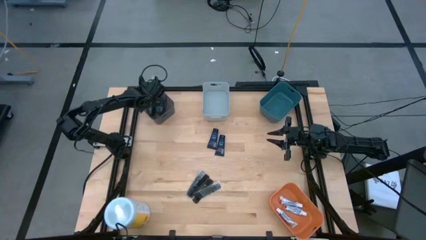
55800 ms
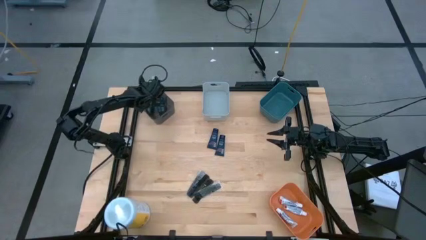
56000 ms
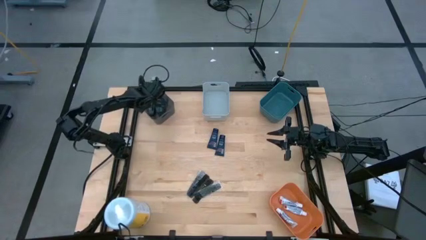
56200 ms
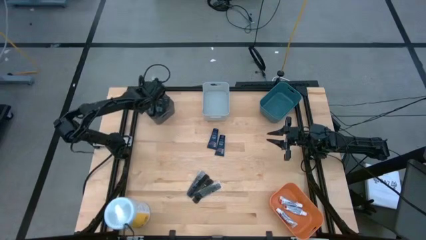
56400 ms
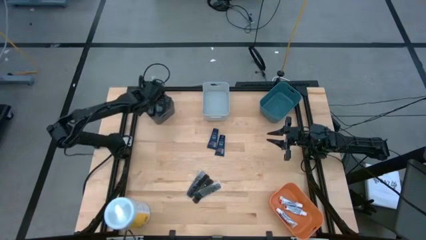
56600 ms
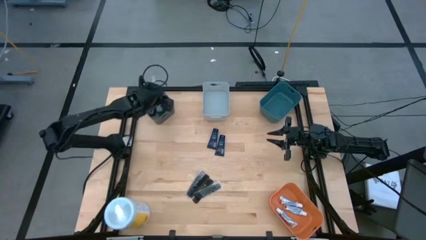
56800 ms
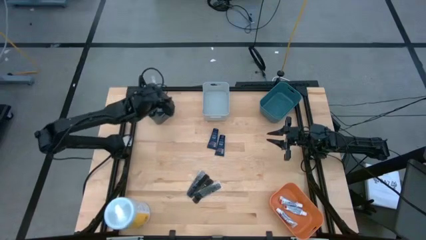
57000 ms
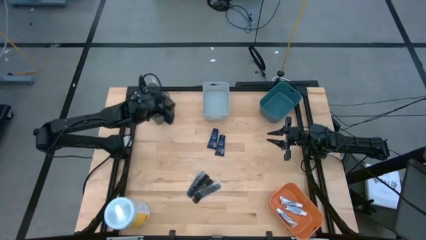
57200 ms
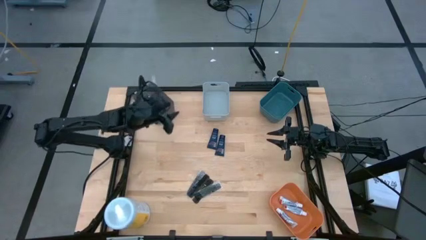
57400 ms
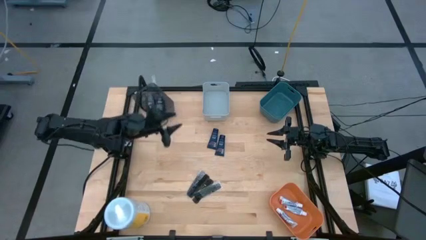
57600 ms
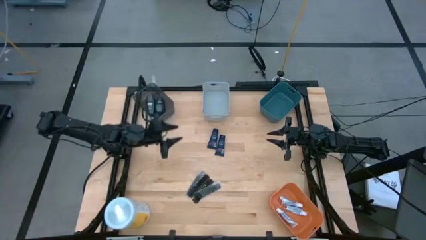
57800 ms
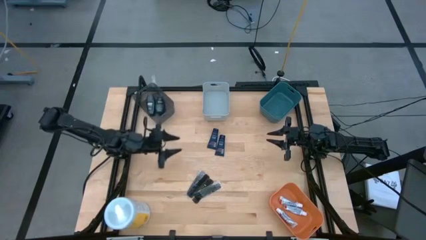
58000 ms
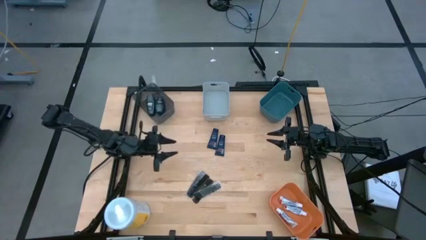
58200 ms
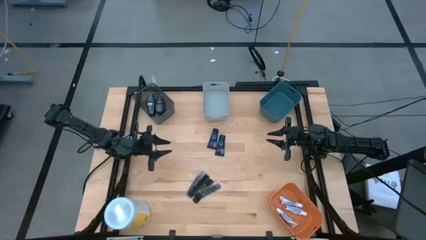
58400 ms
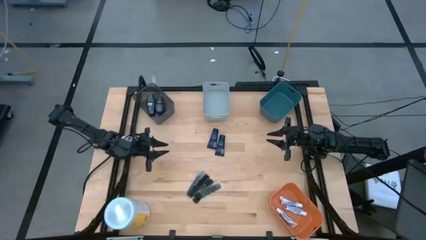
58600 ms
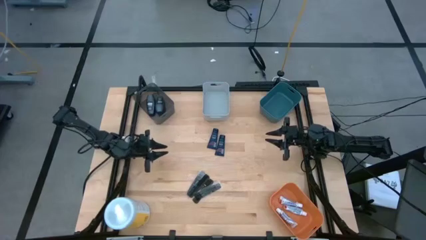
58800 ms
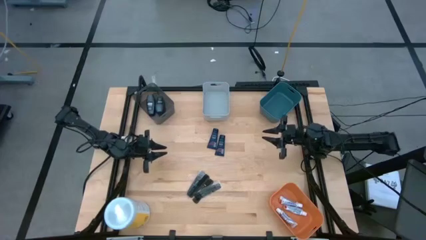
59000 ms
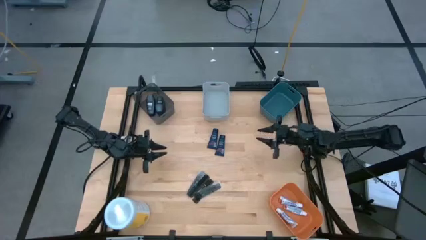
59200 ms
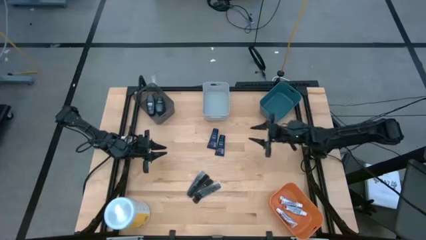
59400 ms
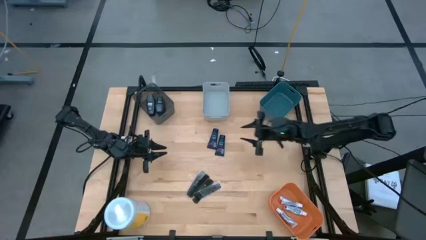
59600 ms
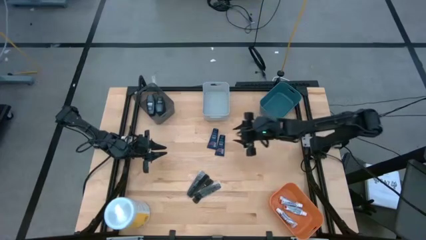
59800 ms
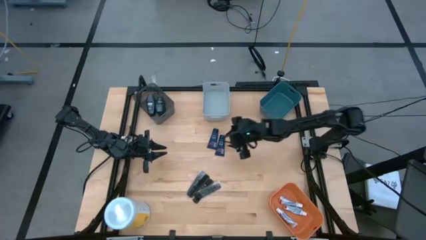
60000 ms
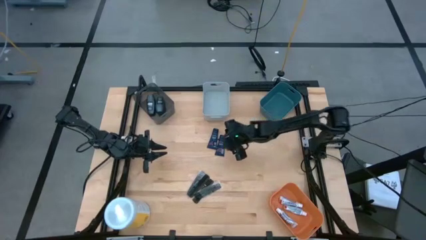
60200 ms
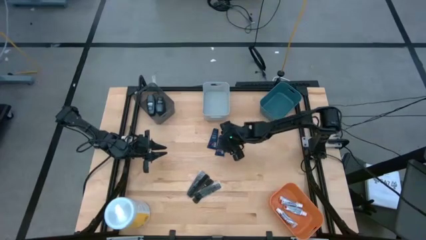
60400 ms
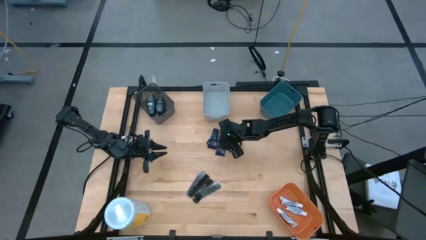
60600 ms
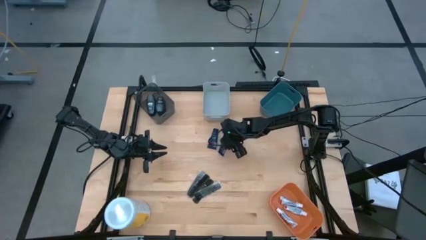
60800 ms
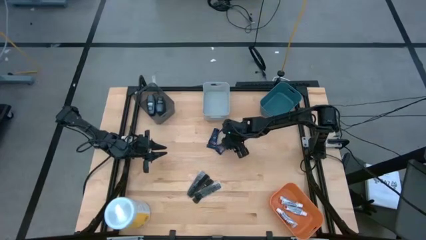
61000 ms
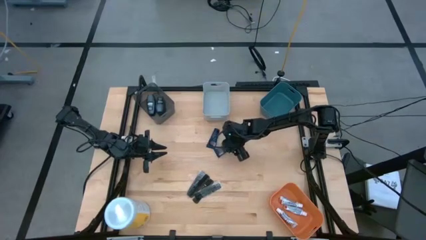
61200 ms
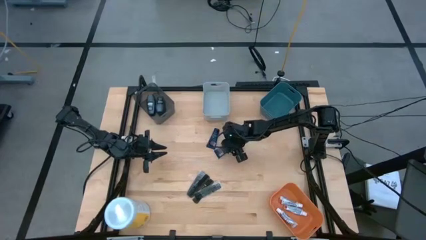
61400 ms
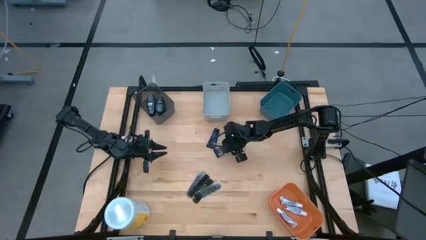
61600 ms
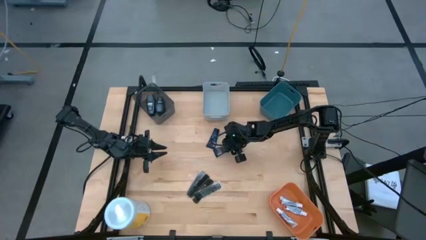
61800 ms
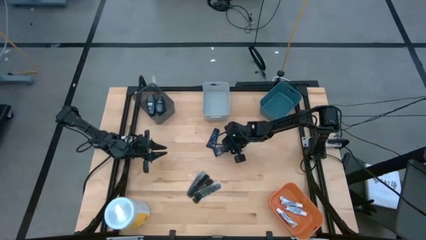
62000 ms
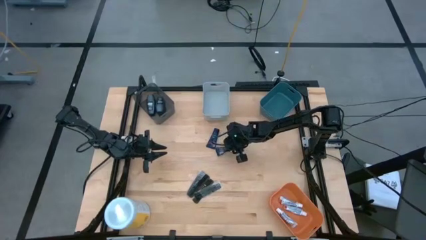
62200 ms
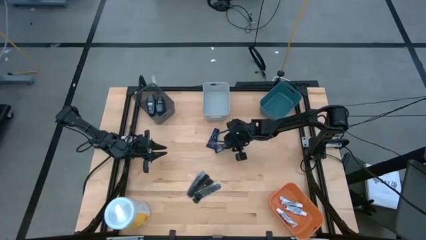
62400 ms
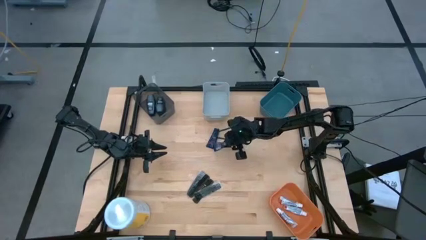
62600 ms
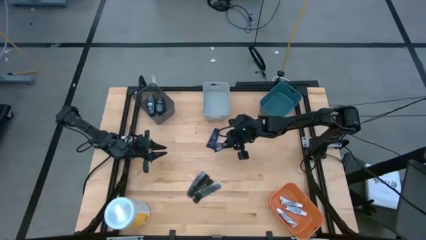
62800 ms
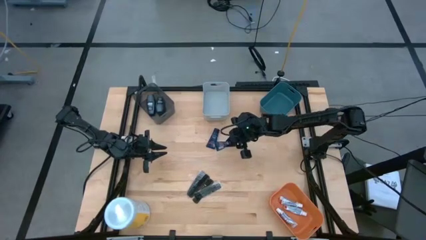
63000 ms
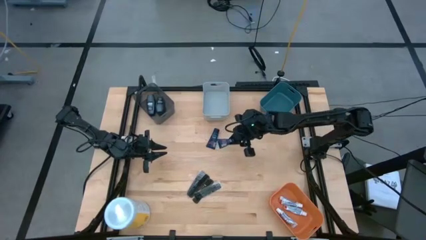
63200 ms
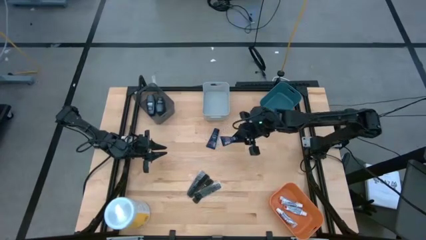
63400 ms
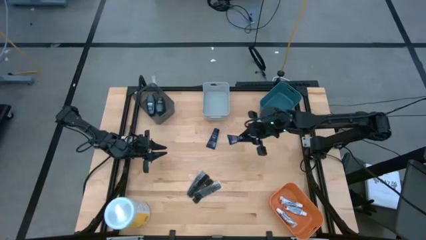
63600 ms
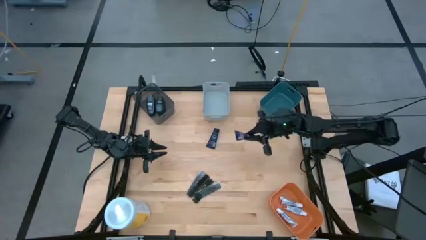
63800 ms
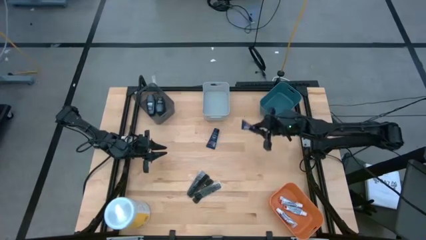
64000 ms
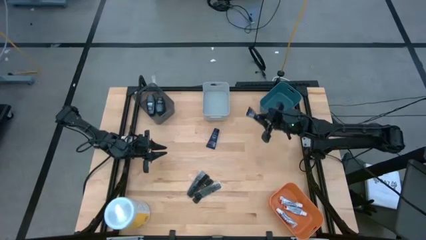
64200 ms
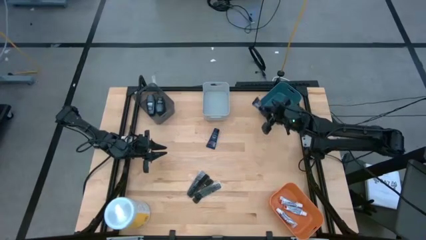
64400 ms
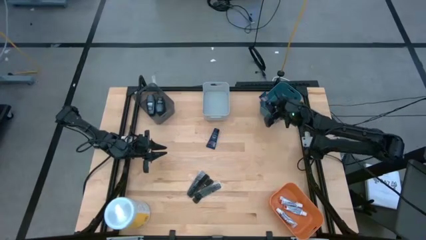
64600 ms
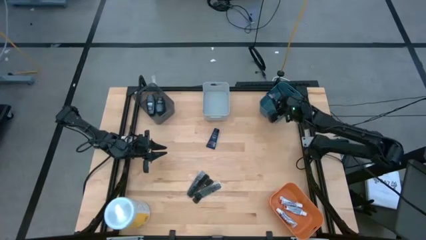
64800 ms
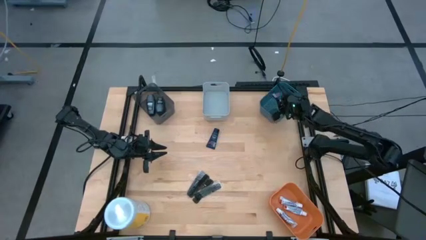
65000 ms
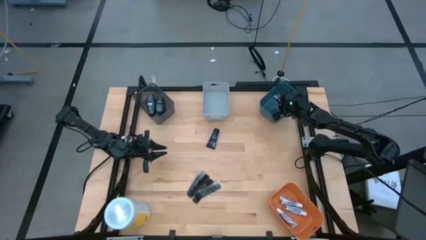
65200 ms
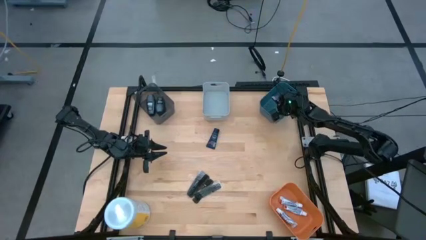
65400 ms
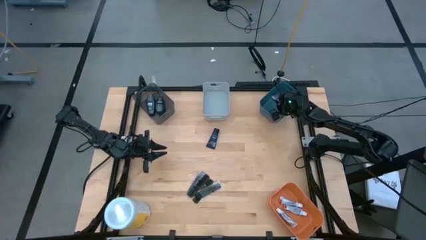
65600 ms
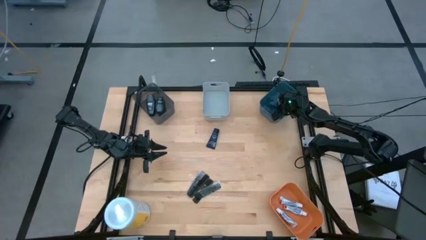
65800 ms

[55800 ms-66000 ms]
Task: Pick & Place Travel size toiletries
Put the right blue shaving cream into the blue bin

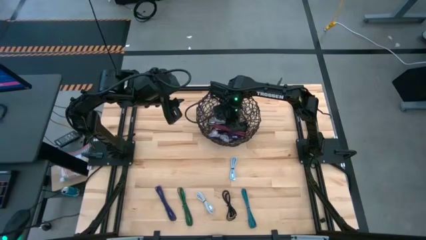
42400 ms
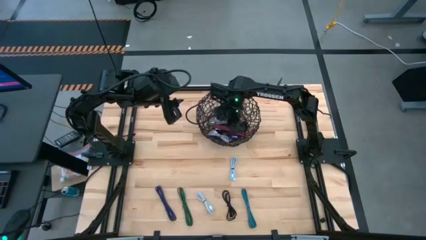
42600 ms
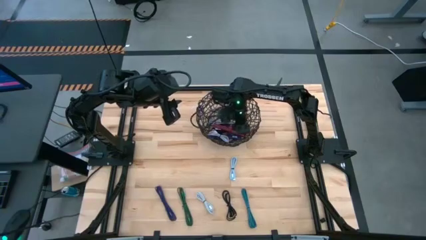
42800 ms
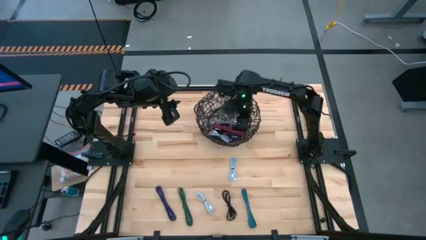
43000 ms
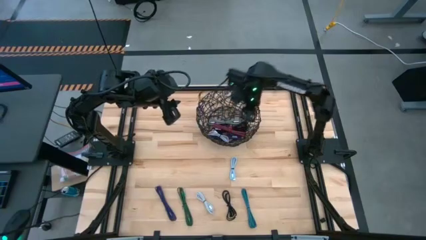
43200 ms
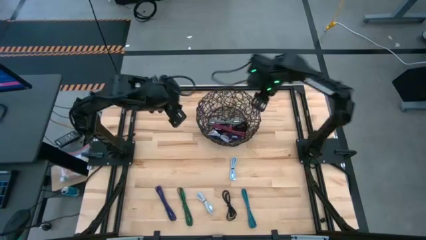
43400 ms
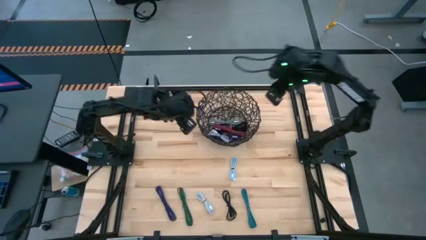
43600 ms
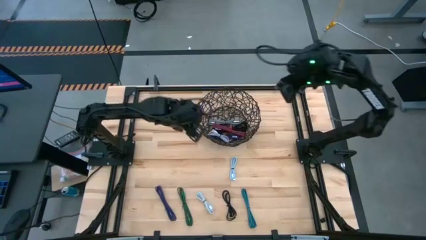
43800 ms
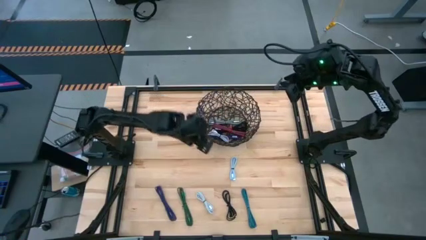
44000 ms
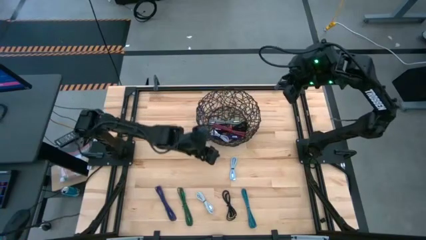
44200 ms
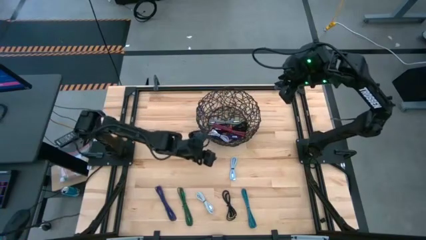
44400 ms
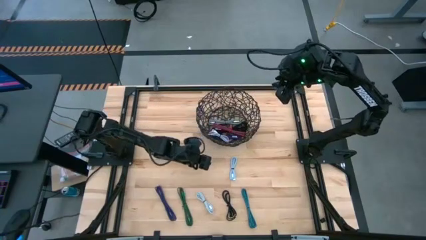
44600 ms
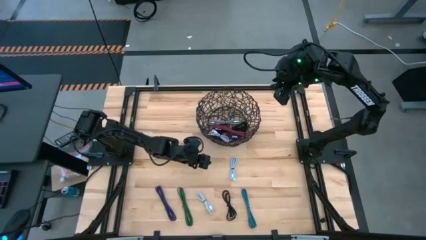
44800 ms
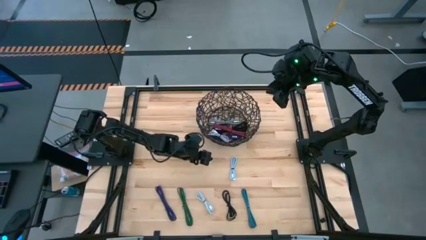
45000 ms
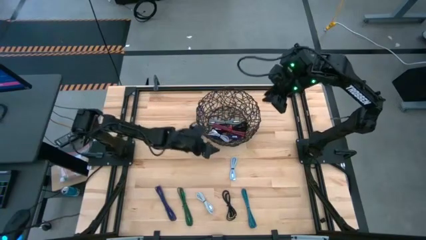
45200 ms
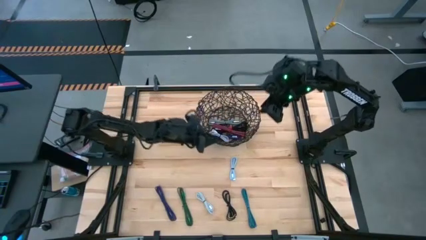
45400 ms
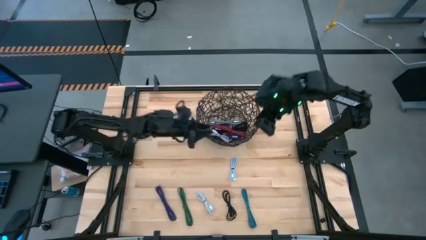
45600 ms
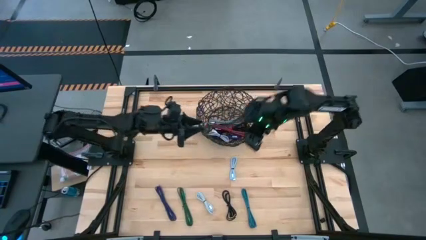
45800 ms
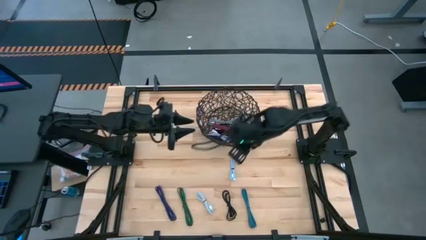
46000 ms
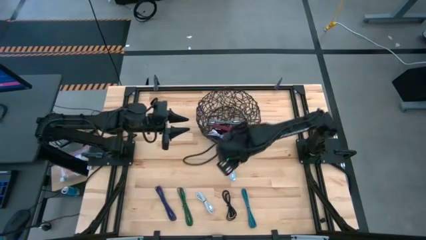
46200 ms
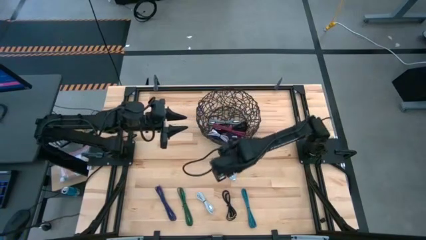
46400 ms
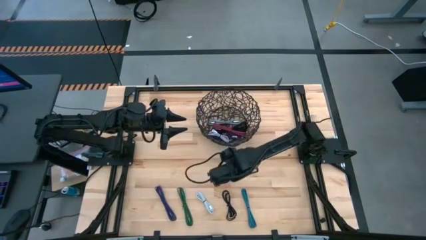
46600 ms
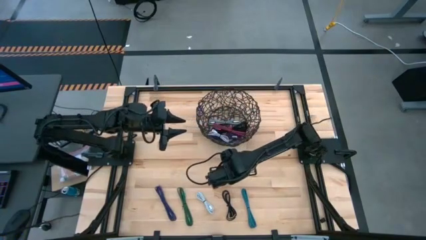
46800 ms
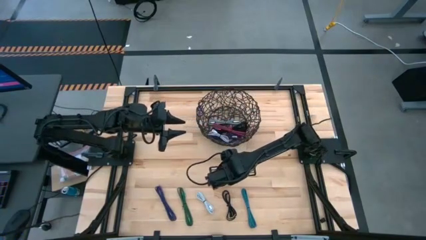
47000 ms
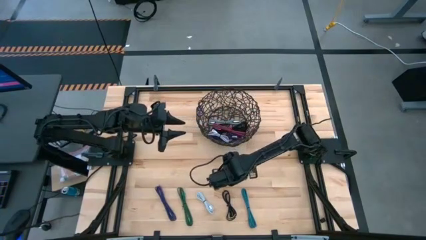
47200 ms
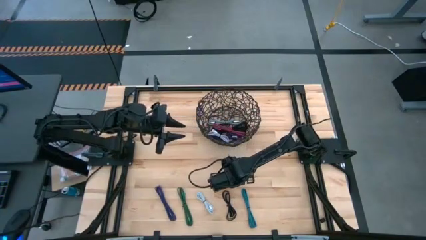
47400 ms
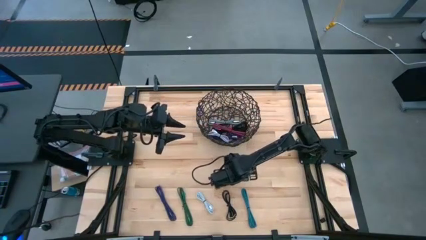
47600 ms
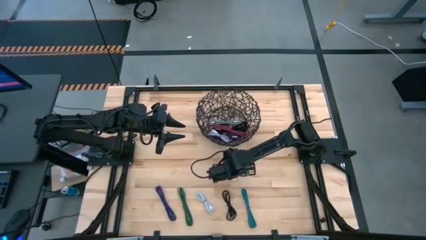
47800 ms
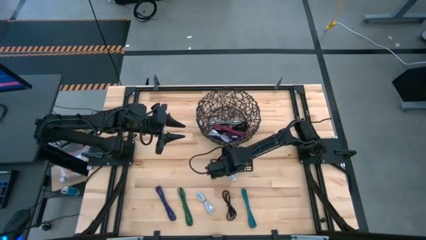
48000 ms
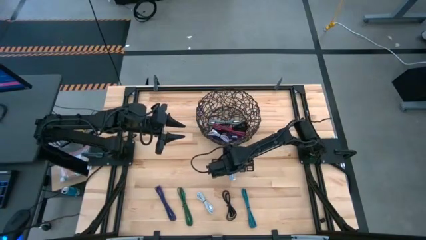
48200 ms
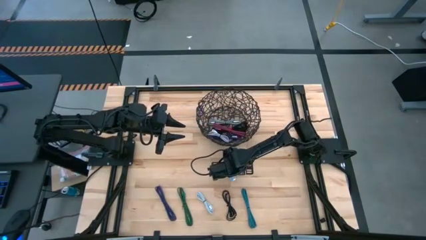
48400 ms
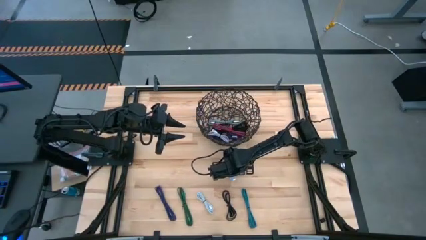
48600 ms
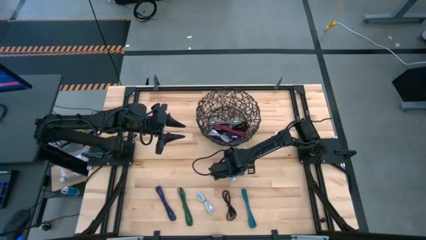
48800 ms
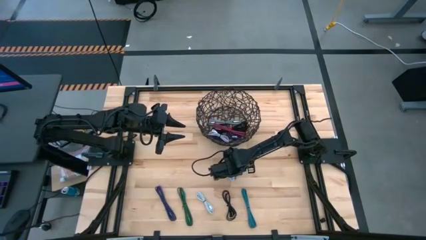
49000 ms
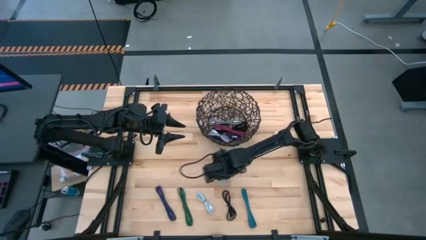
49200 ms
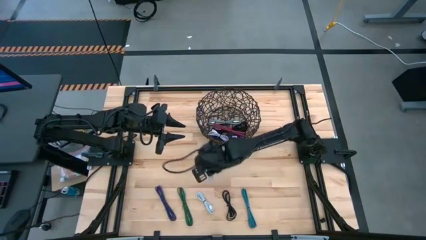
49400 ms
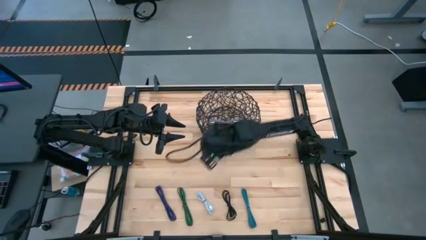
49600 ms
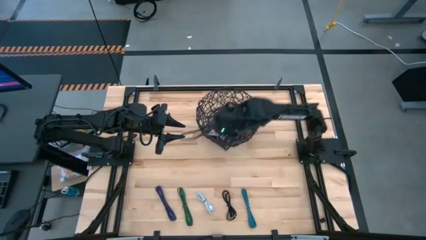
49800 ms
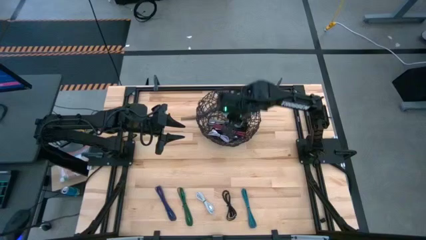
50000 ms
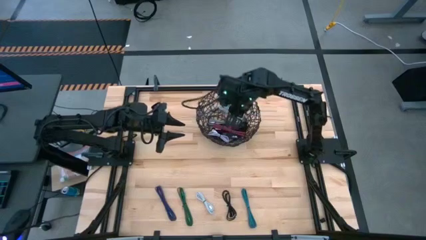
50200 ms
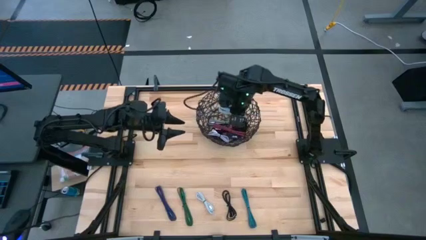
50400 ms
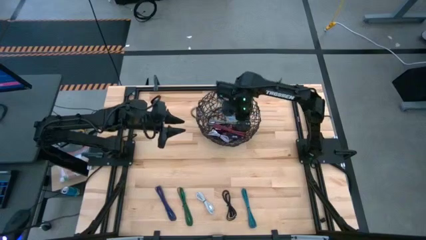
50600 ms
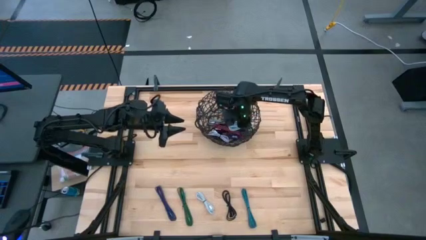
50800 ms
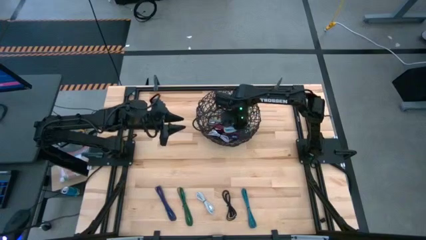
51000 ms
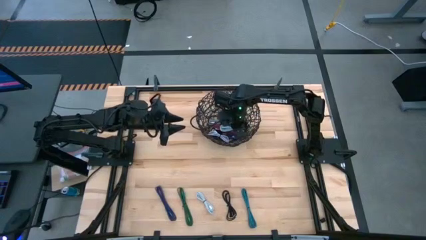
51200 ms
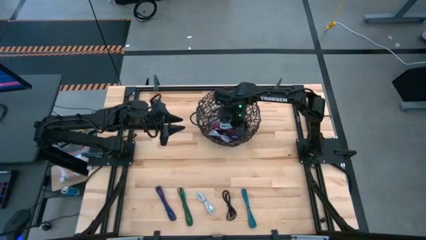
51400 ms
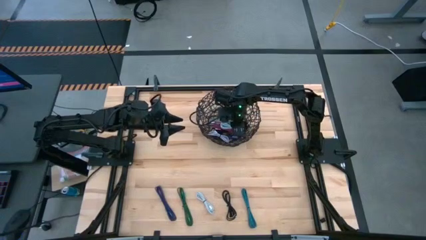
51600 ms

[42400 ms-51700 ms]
Task: Pick and place USB-C Cables
Put the light blue charger cable into the black mesh basket
